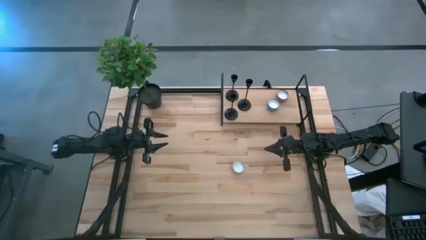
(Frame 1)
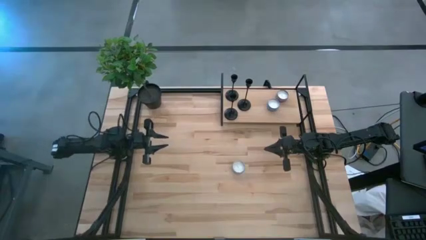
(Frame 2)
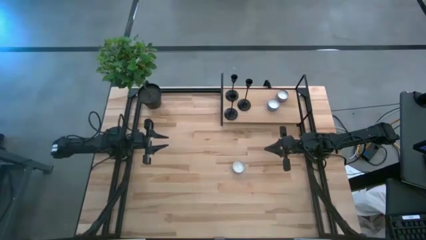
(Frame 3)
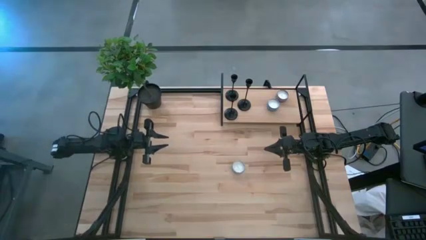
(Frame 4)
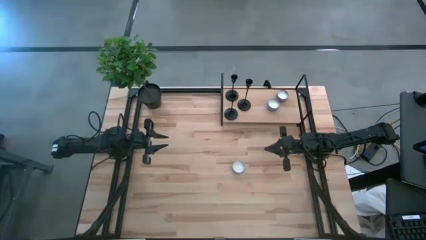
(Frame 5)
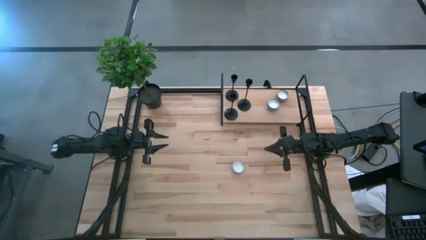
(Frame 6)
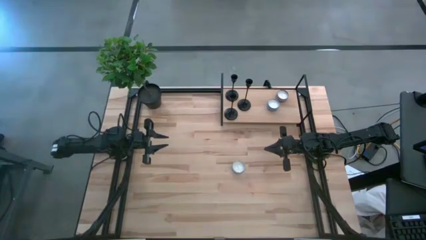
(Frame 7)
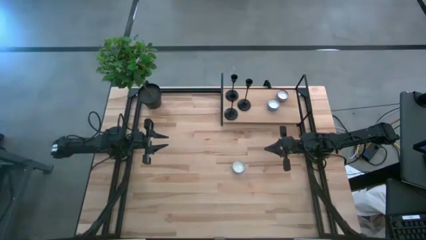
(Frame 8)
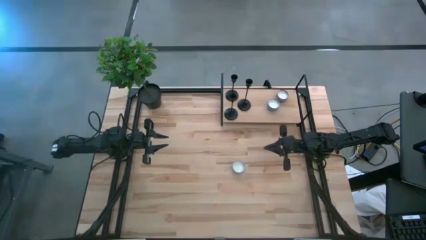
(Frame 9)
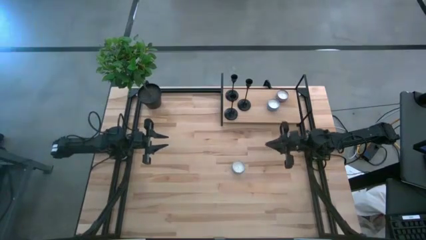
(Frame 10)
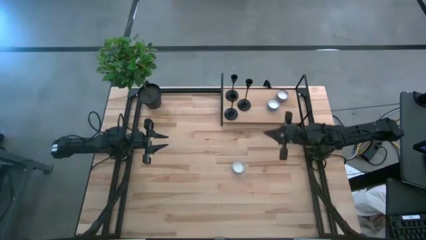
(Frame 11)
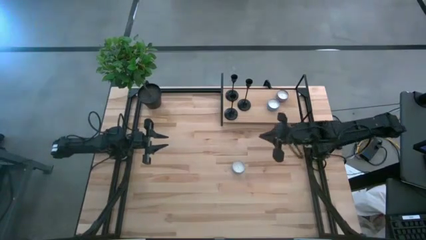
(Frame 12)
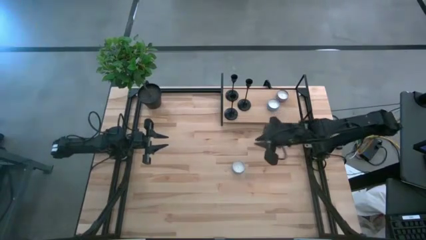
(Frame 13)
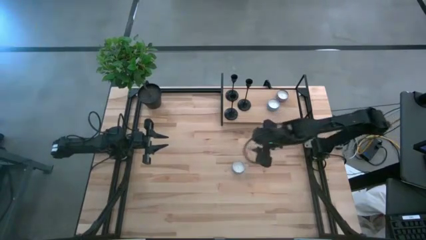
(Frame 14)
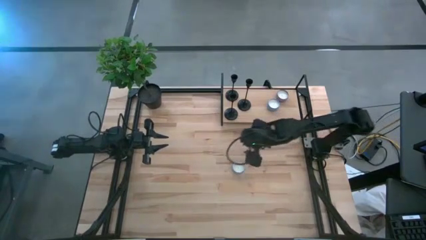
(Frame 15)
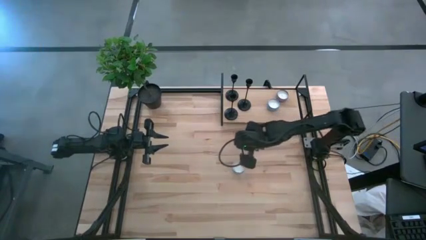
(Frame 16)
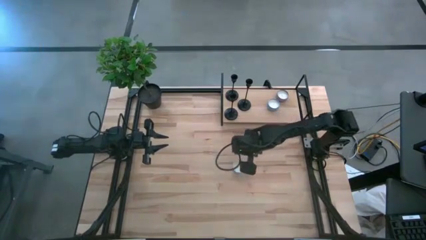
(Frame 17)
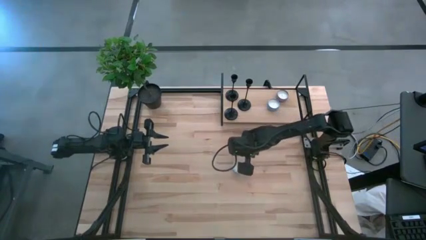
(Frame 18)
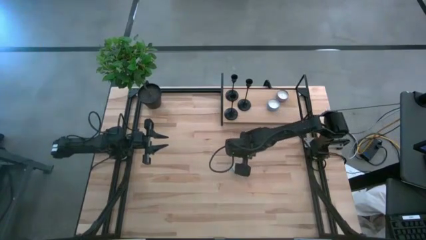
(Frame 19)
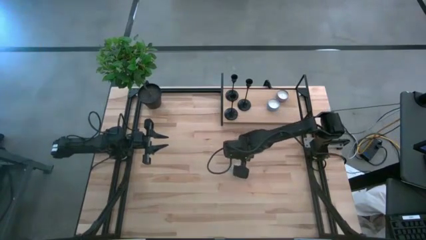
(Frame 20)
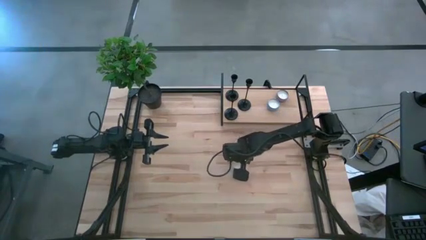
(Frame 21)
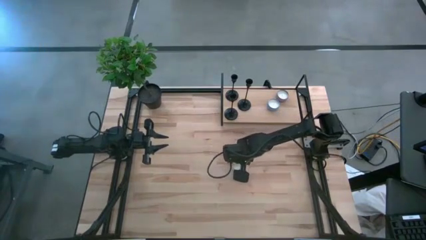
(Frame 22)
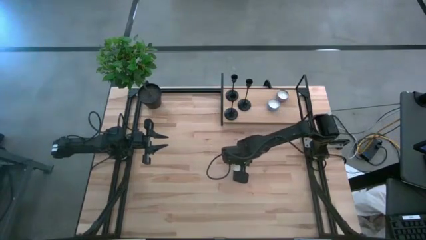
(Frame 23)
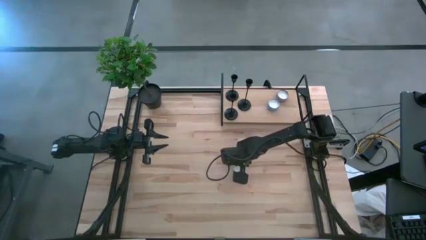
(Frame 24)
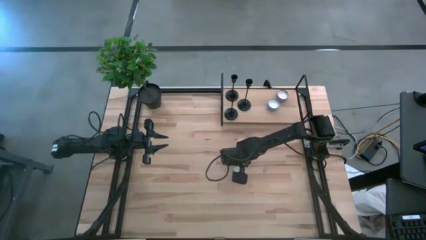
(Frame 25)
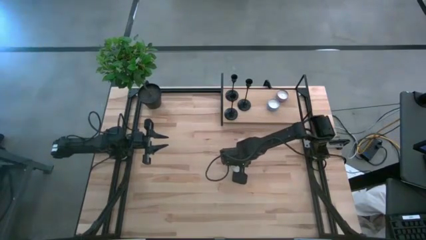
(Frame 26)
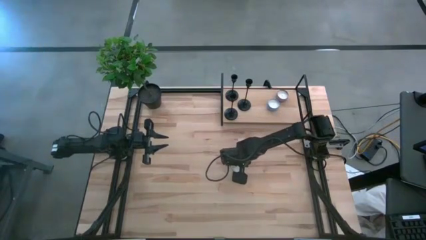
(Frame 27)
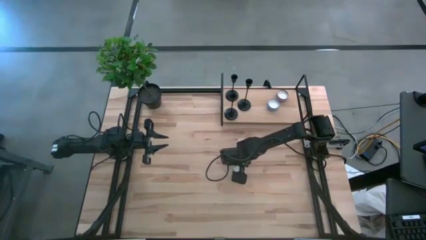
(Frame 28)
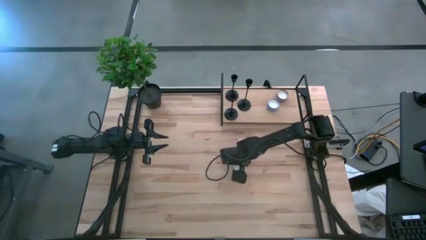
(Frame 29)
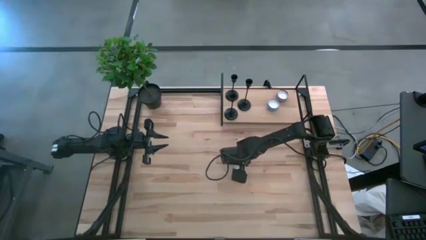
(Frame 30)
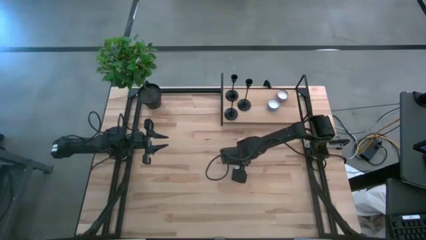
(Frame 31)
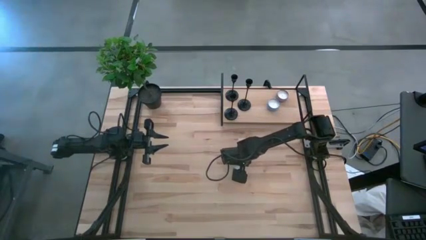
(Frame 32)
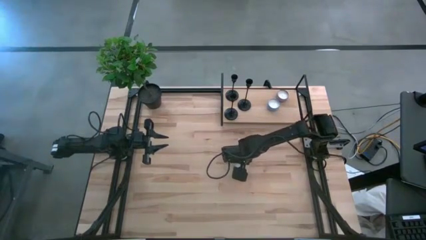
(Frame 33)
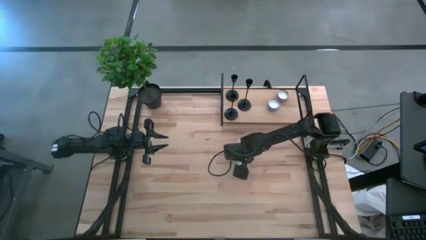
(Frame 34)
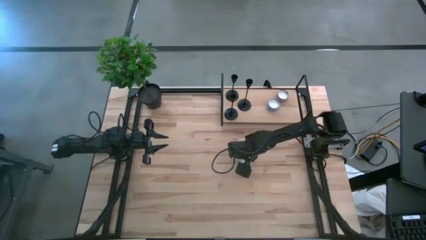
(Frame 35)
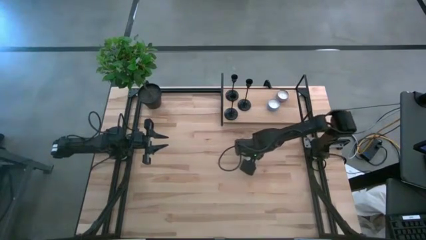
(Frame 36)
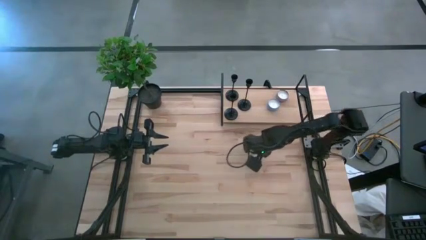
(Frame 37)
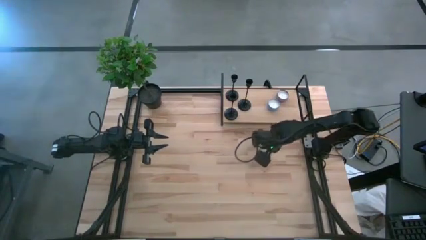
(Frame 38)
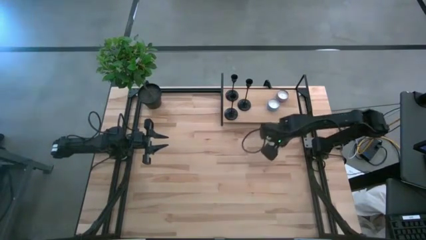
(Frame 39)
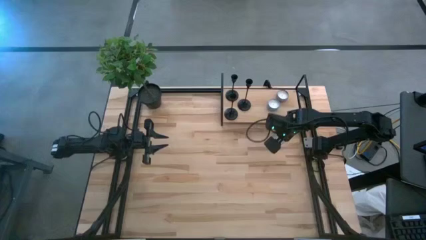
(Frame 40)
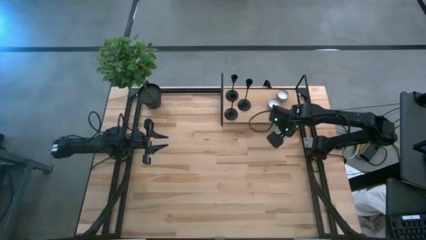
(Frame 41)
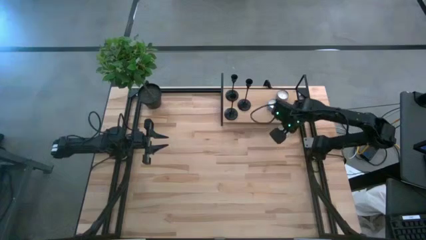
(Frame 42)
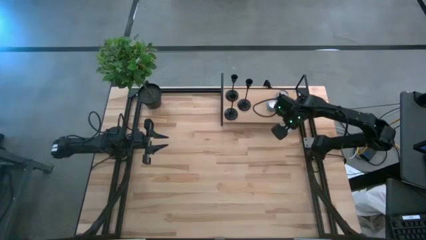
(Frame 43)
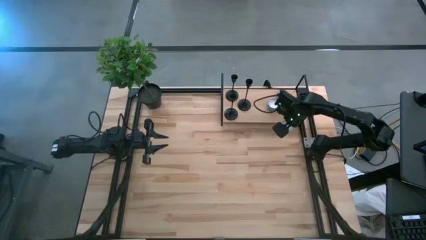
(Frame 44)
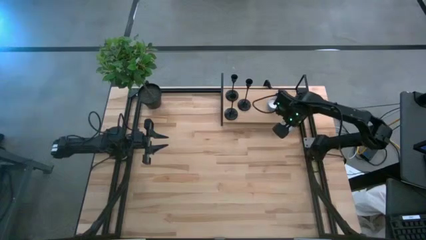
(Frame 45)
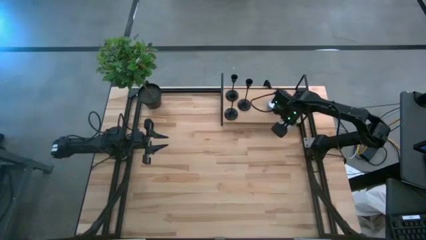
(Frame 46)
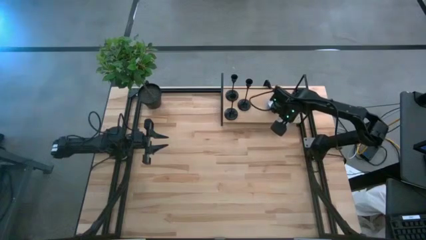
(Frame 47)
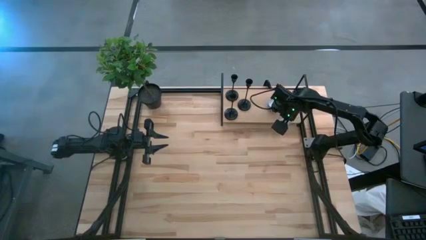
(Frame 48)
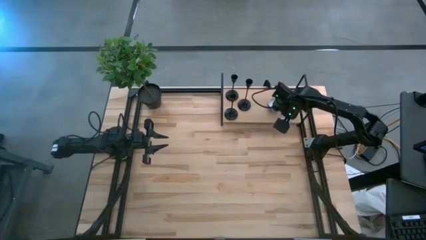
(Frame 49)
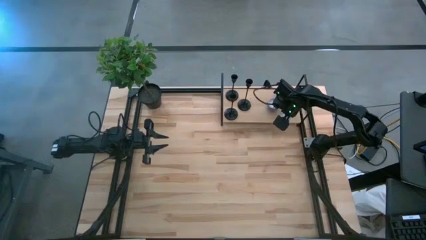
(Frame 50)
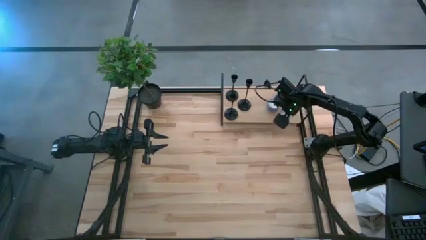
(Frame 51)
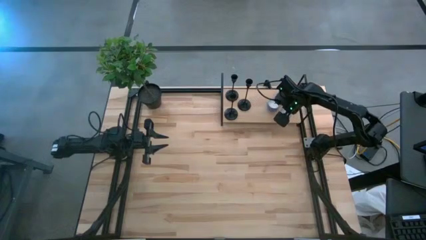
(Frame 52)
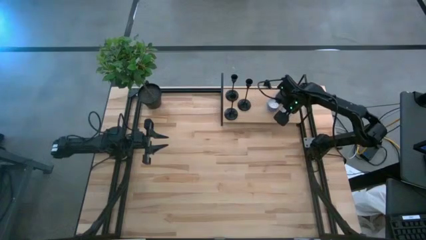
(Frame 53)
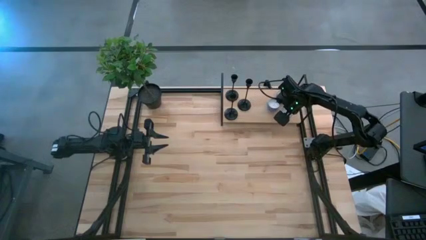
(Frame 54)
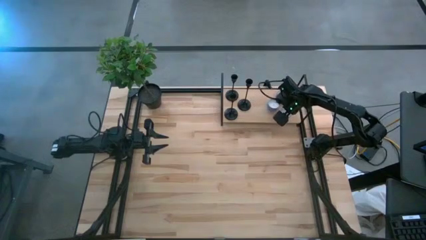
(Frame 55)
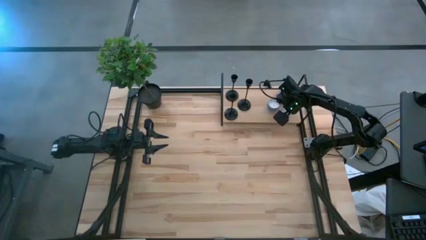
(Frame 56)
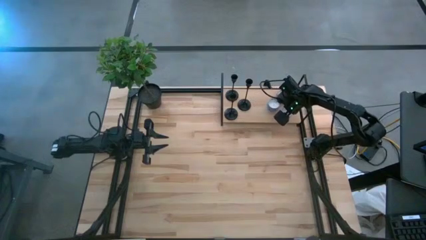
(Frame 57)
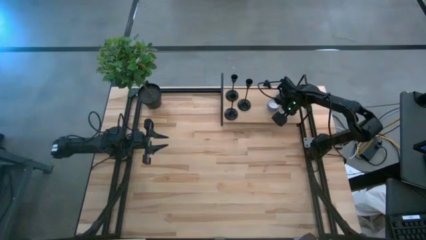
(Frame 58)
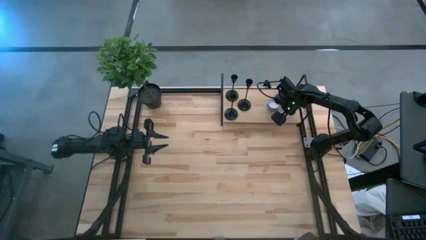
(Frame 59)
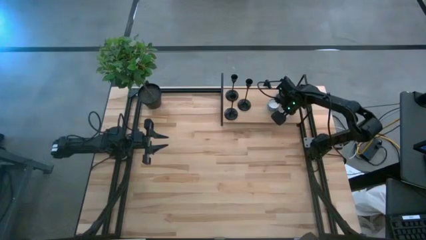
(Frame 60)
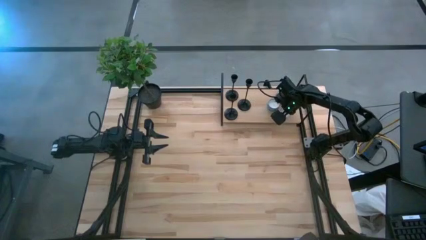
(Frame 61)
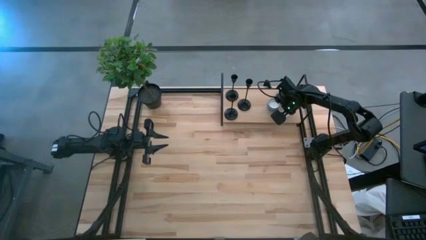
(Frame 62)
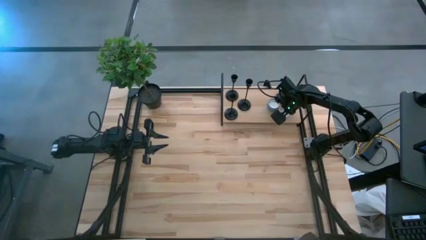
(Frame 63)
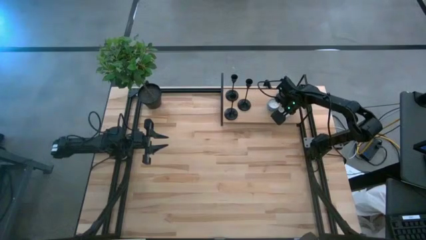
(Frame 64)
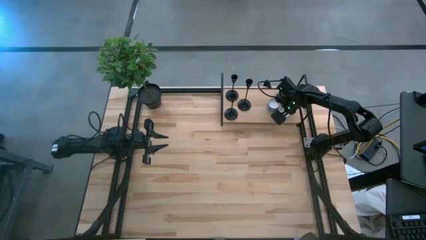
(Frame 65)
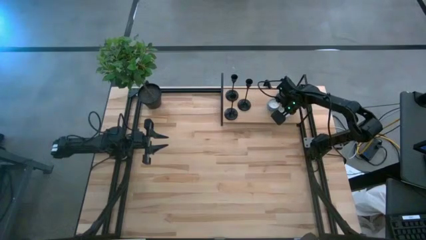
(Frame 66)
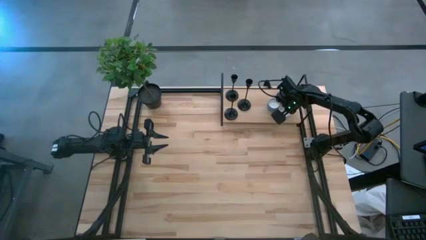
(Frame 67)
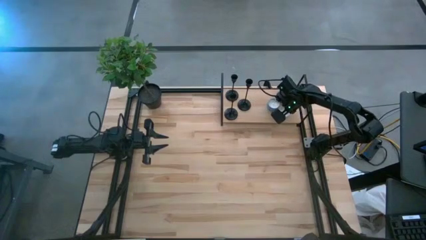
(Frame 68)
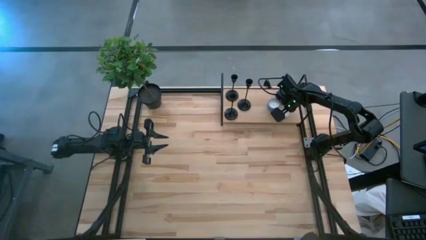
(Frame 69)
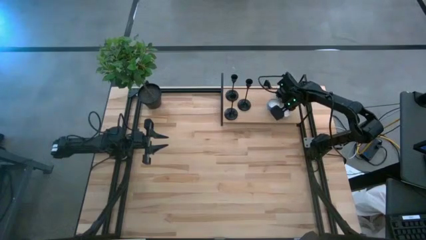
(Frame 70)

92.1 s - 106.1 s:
Task: Pick & Place candle stick holders
Put the red scented candle on the shelf
